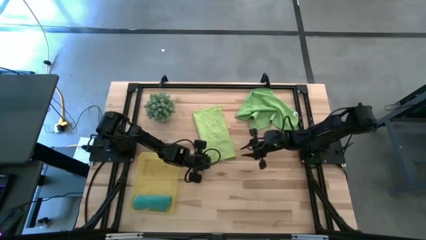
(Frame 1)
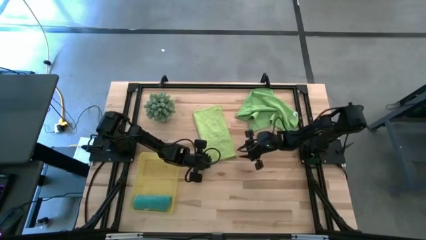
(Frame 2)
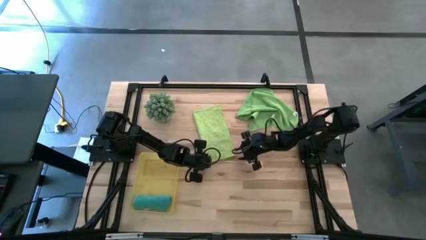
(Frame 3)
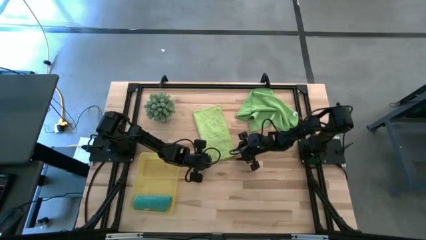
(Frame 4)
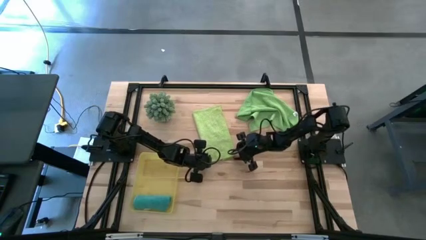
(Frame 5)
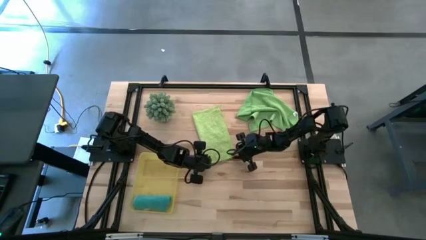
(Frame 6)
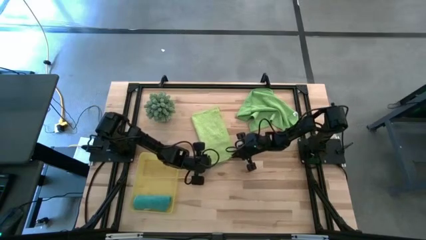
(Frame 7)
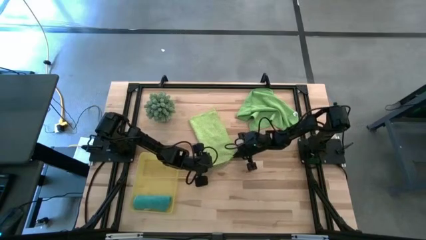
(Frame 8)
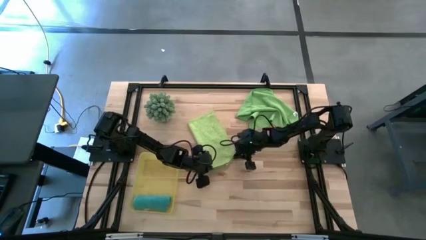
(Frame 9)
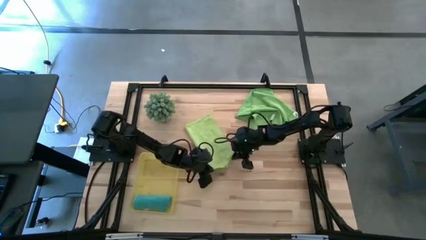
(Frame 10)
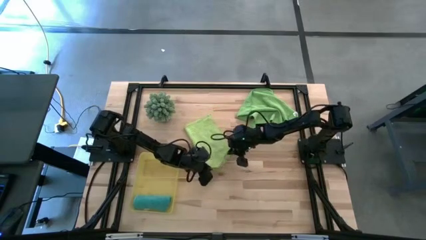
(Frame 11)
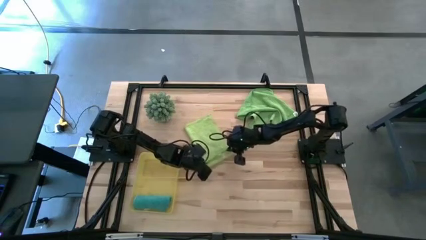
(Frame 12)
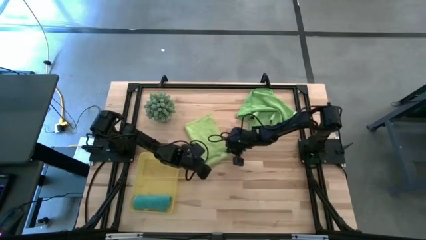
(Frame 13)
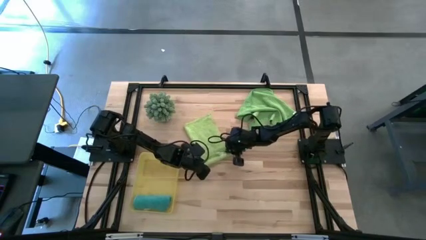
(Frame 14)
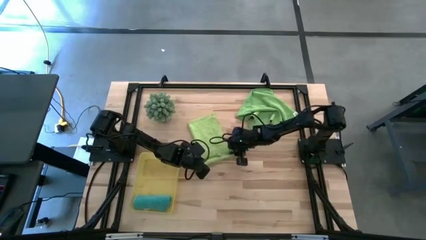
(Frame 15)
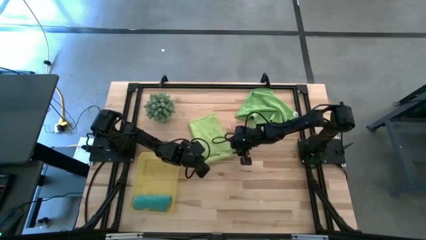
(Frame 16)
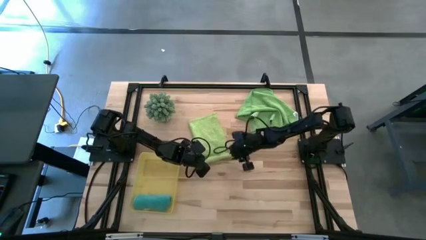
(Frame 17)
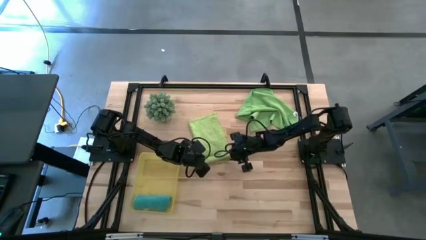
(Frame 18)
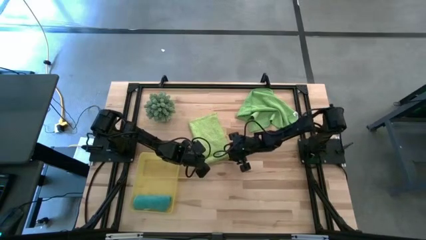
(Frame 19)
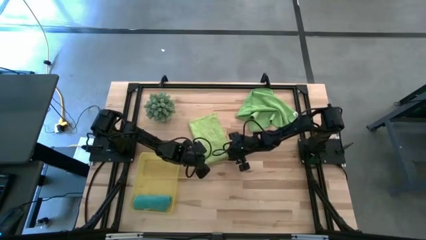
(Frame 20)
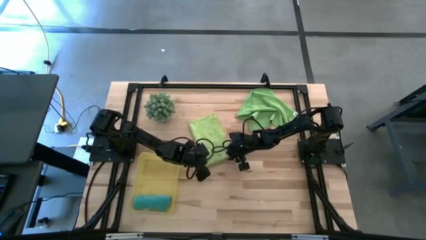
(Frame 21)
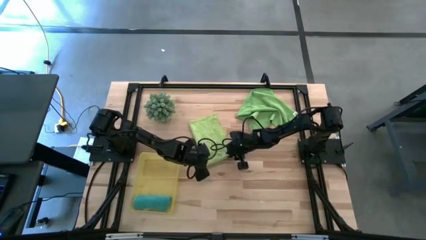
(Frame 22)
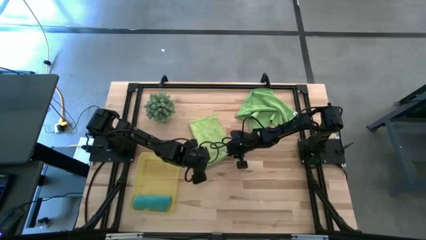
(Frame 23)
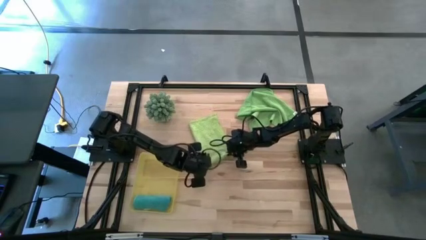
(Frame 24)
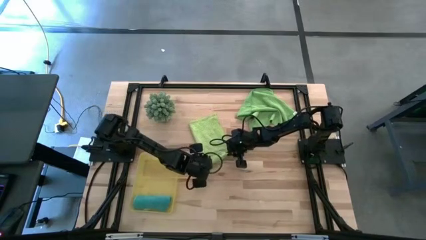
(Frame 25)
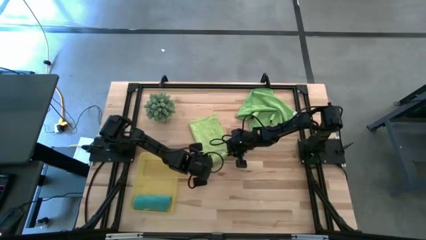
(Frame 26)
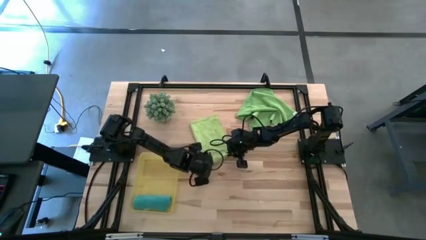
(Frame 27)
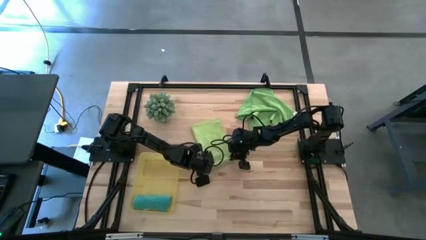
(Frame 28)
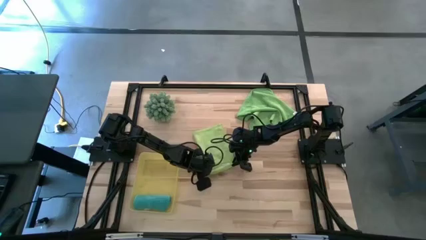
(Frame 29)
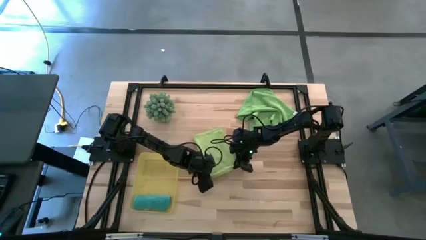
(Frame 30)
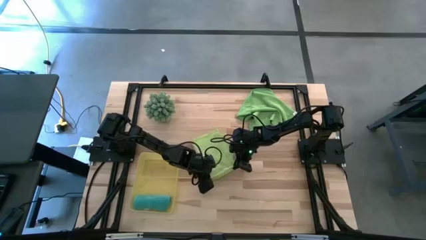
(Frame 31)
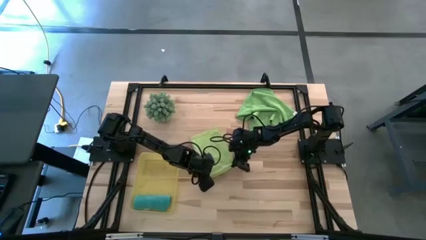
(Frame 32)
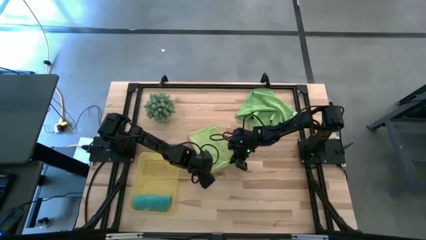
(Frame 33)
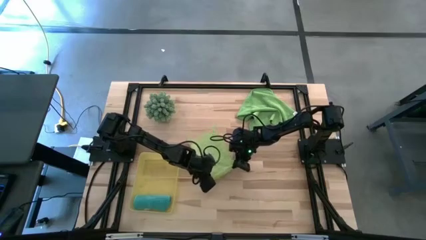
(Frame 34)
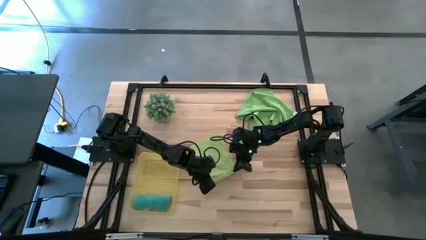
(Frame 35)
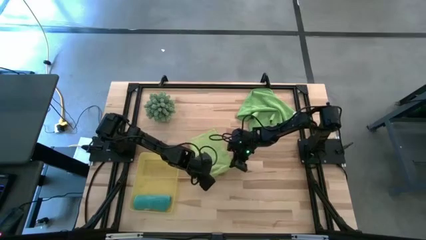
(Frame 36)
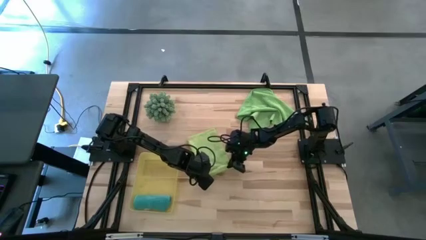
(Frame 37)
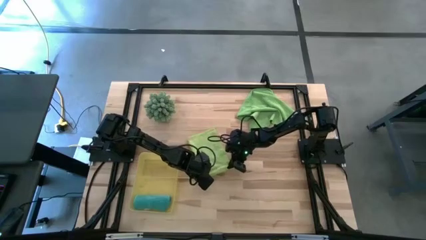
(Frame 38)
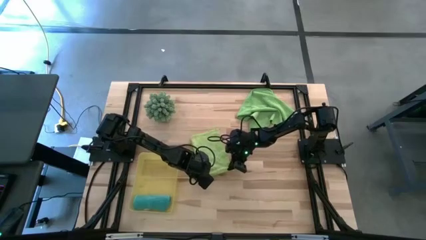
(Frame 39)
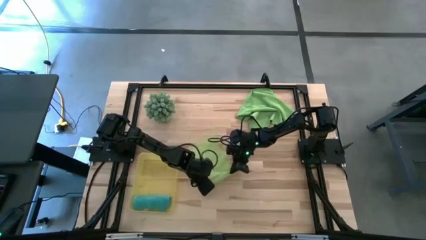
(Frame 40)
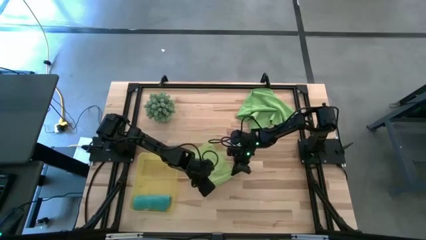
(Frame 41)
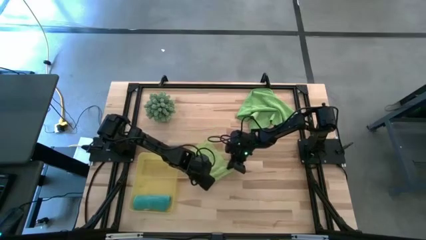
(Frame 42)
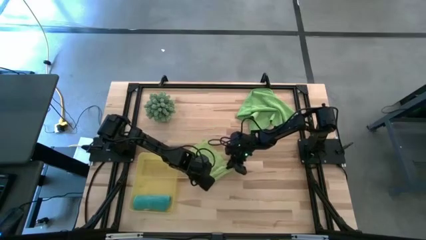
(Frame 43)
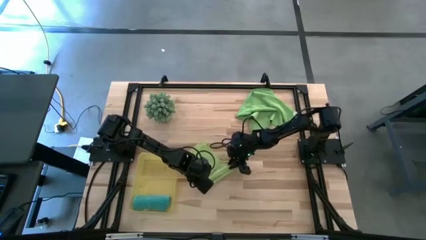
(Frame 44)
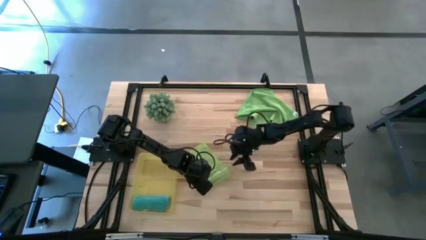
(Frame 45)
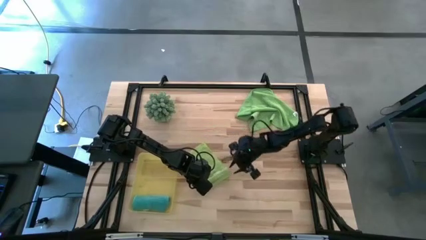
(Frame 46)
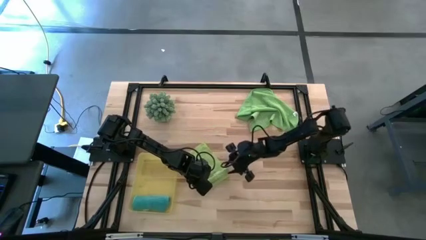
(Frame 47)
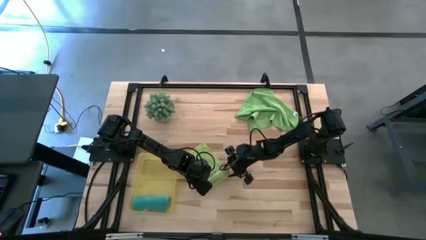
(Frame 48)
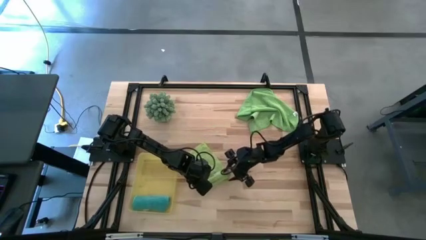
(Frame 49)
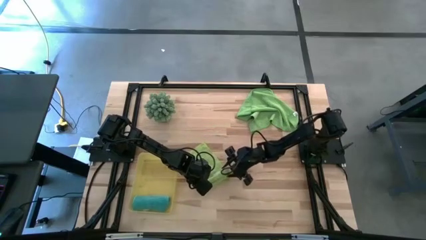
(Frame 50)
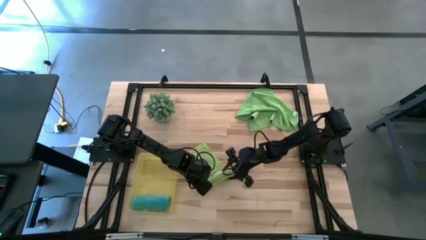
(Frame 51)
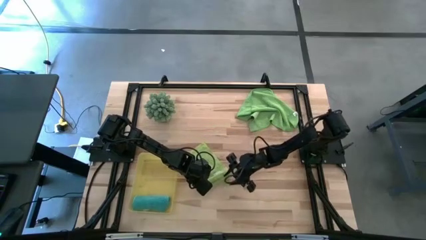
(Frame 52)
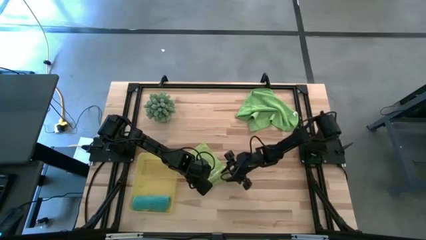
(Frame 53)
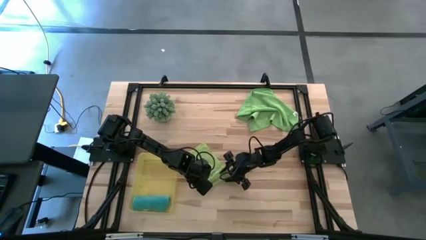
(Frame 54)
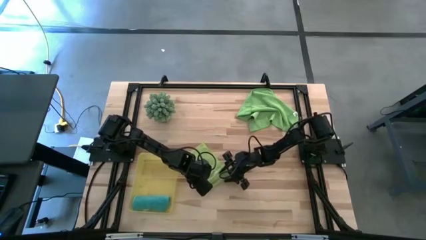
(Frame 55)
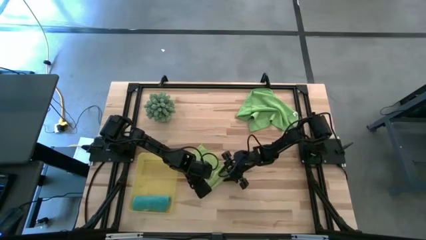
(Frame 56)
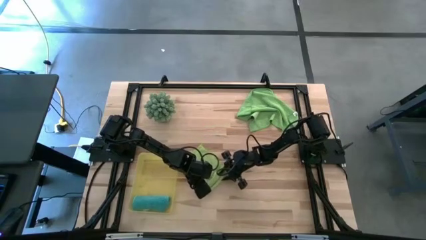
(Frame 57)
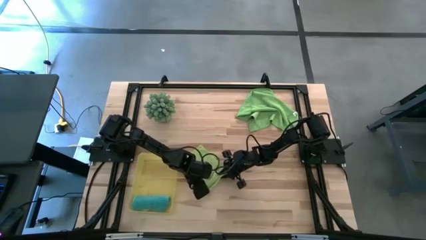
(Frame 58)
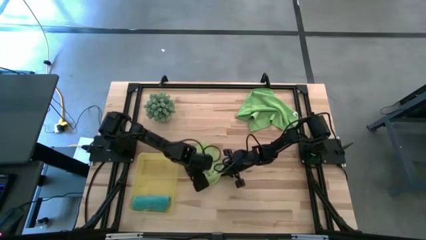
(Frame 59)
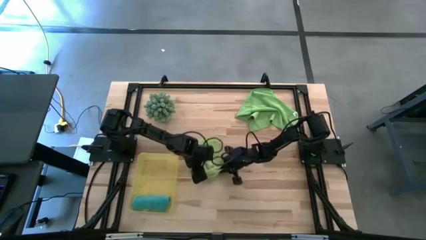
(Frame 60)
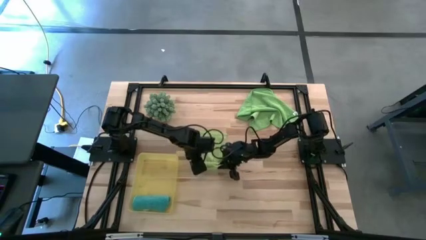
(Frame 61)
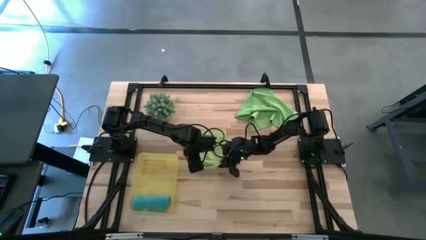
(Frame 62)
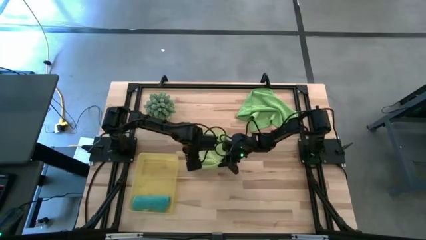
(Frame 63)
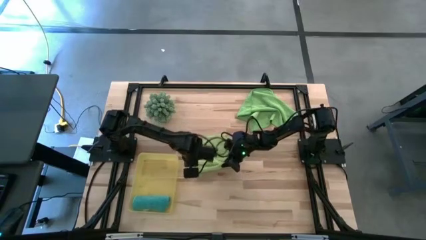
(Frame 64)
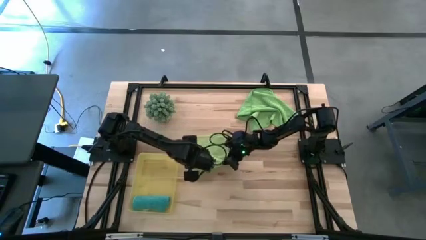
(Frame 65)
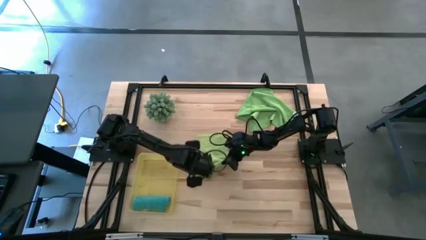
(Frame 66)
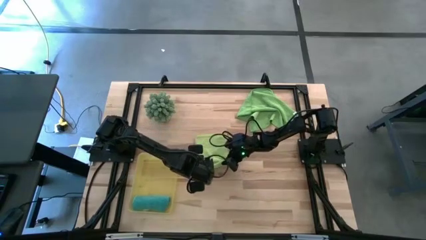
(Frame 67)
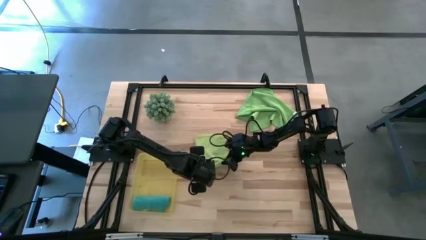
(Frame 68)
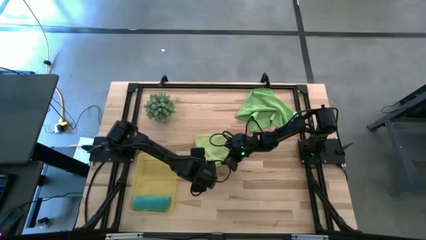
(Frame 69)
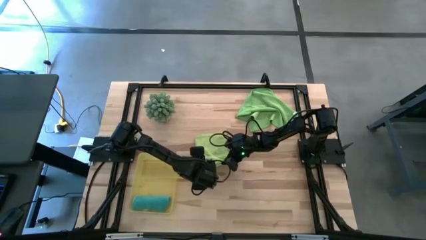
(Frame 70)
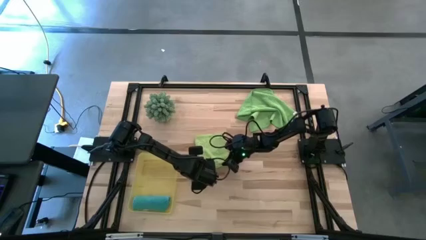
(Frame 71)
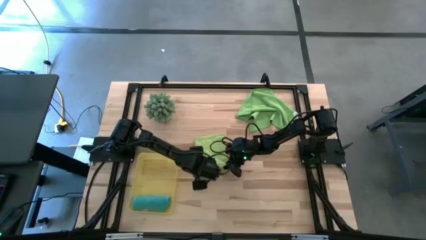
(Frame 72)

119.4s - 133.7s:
Task: Roll microfiber towels into tight, uniform cylinder then place into a basket
Roll the light green towel

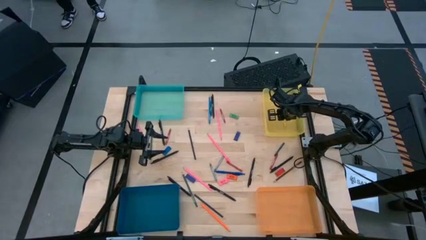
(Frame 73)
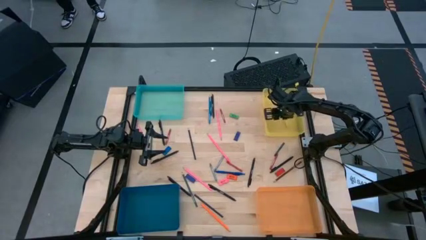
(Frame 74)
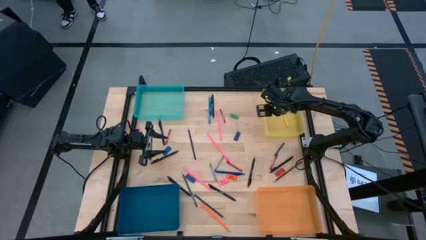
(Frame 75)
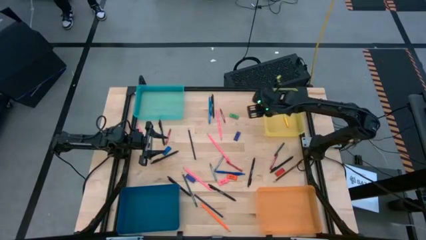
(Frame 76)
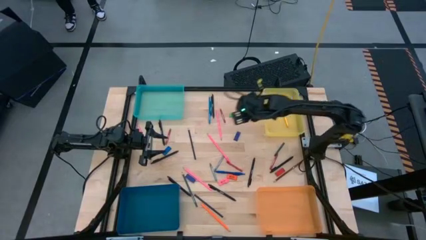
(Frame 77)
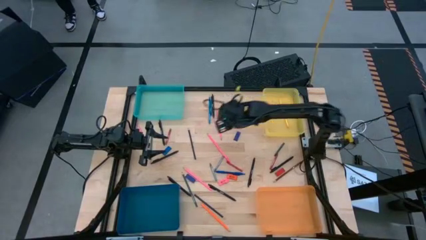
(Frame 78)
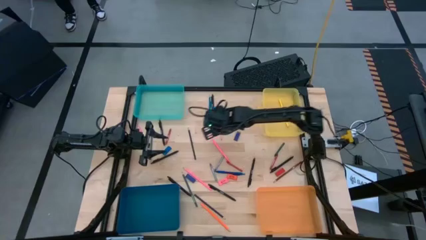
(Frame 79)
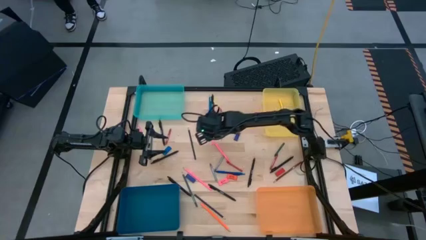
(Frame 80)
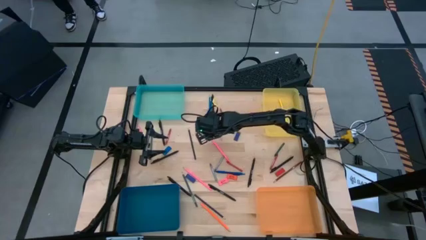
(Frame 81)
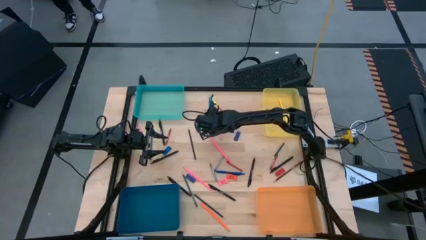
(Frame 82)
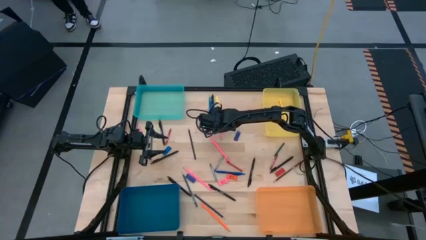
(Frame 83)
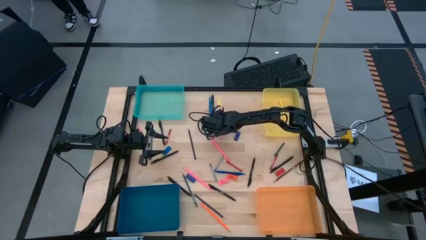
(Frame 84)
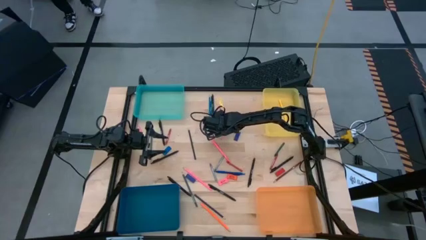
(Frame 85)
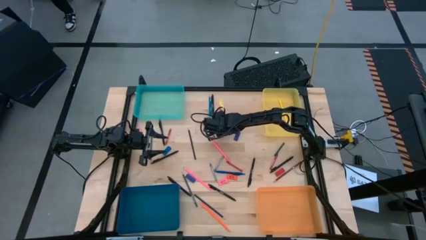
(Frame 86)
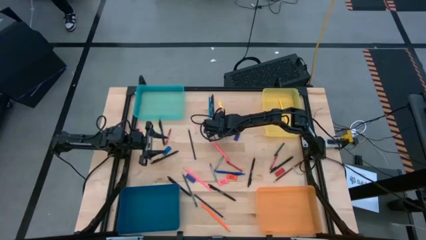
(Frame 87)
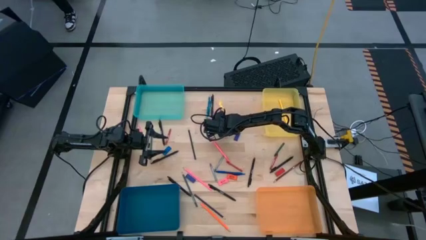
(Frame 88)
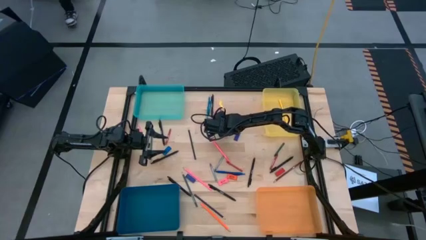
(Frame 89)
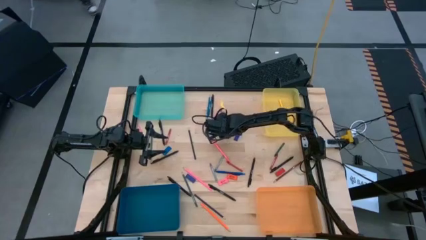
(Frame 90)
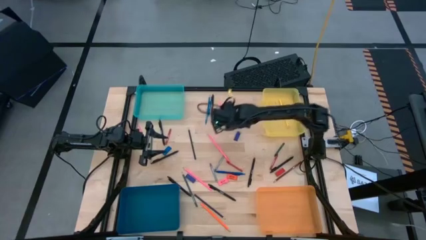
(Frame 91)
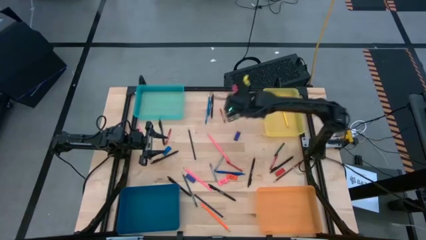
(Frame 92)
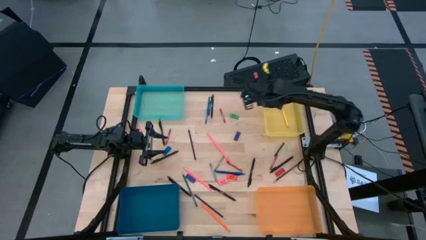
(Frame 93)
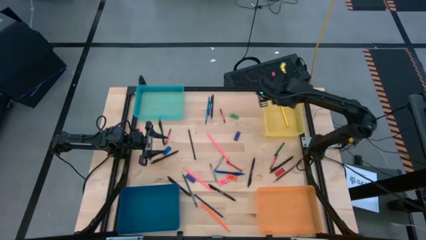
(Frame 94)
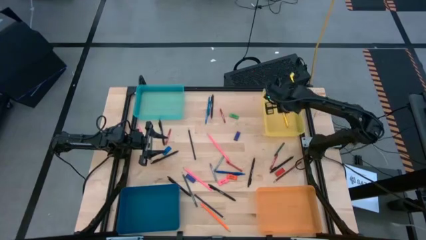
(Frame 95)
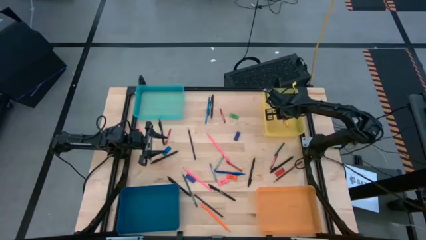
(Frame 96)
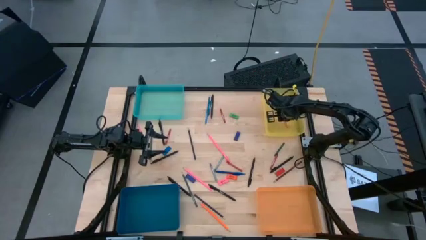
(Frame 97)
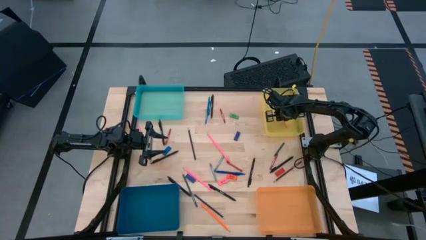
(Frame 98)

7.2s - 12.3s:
Task: Sort crayons/erasers/pens/pencils in bins
Put the pink pencil into the yellow bin
